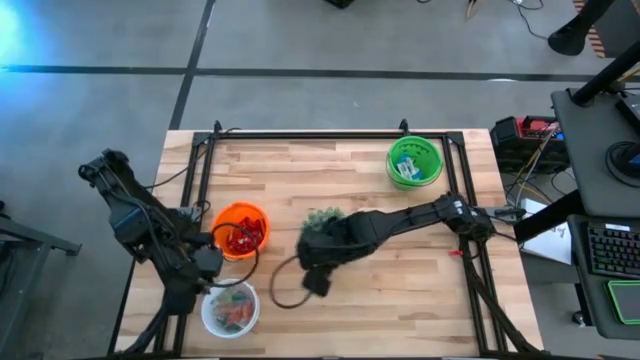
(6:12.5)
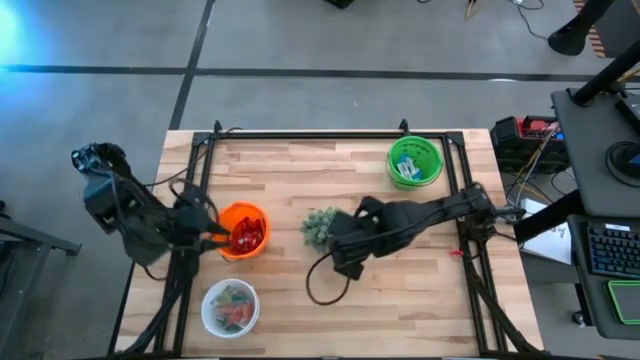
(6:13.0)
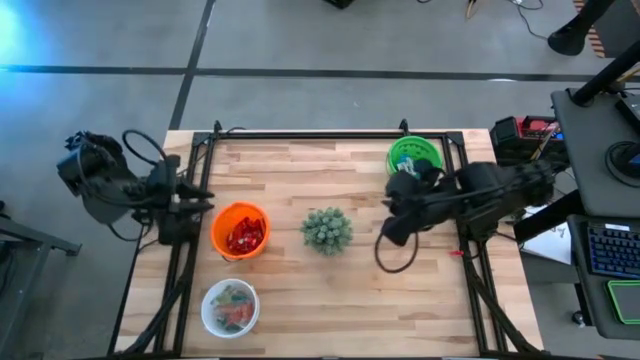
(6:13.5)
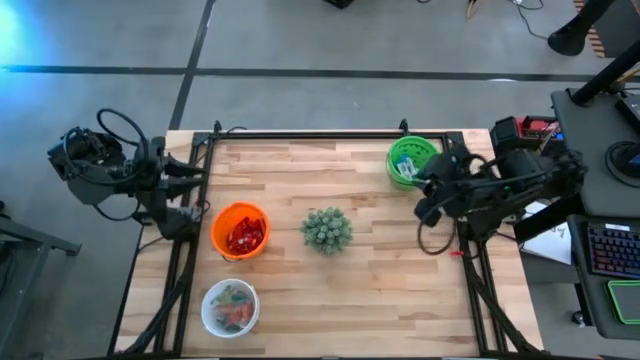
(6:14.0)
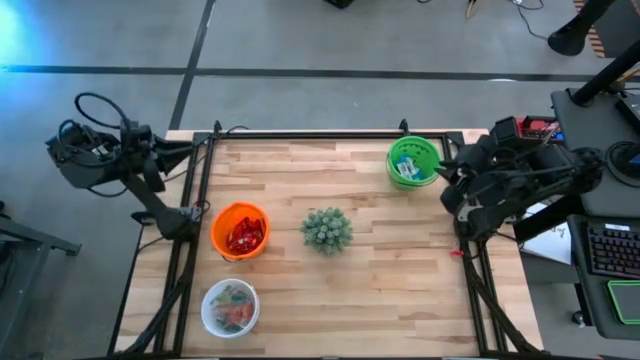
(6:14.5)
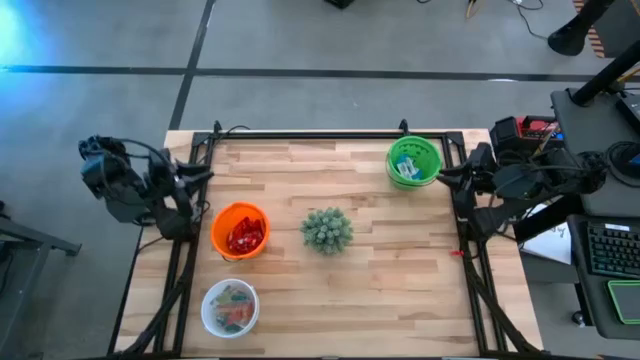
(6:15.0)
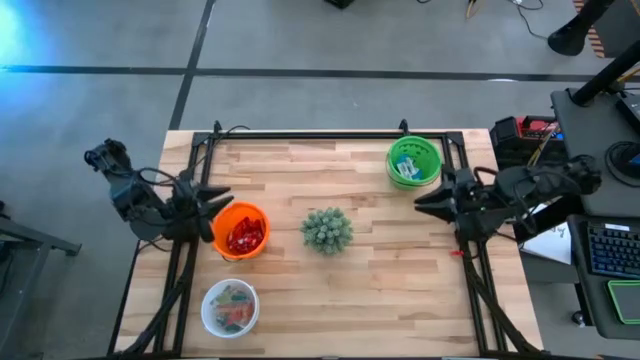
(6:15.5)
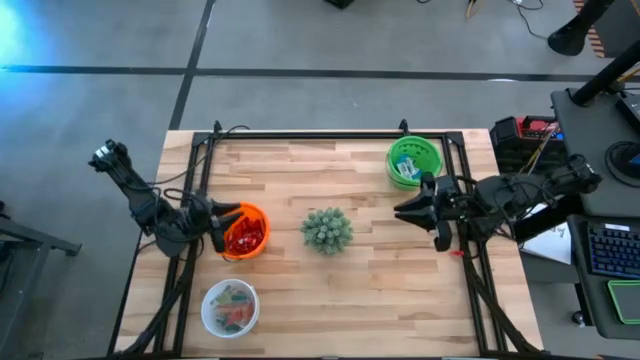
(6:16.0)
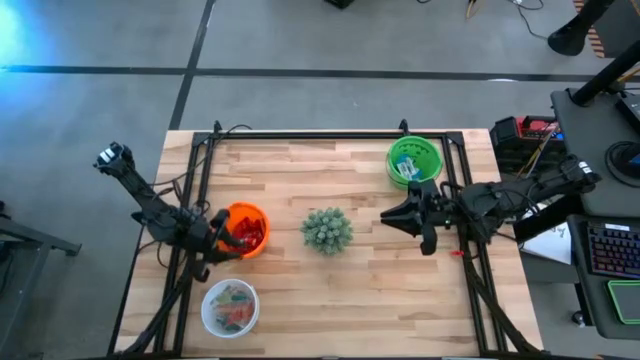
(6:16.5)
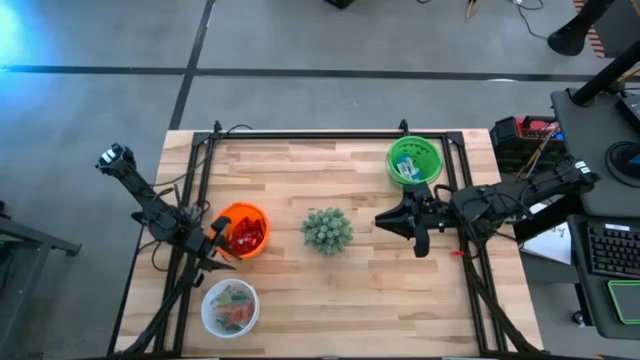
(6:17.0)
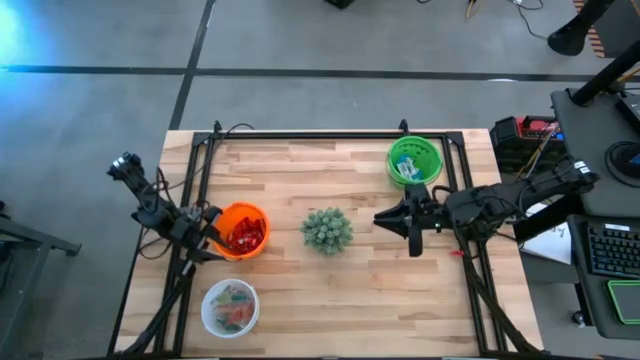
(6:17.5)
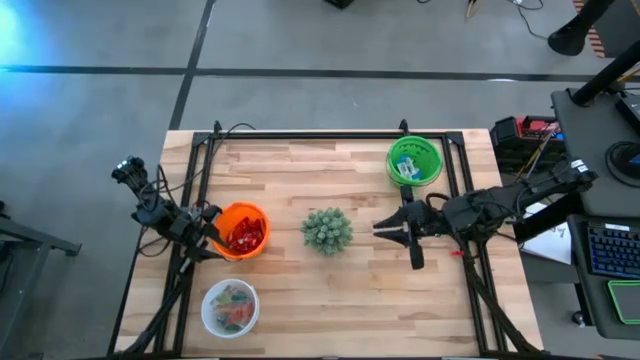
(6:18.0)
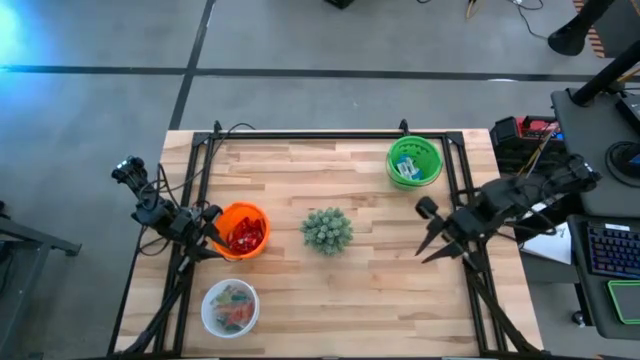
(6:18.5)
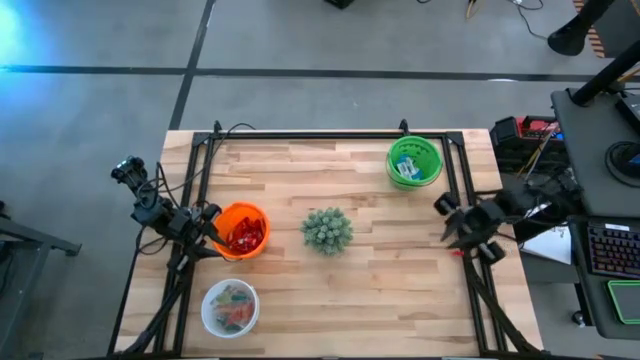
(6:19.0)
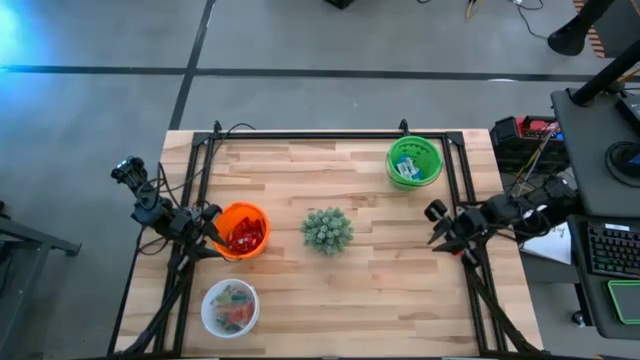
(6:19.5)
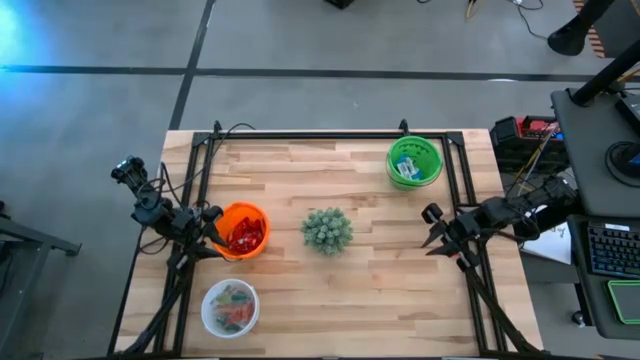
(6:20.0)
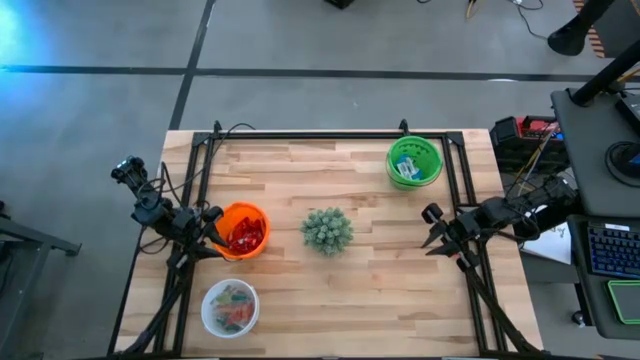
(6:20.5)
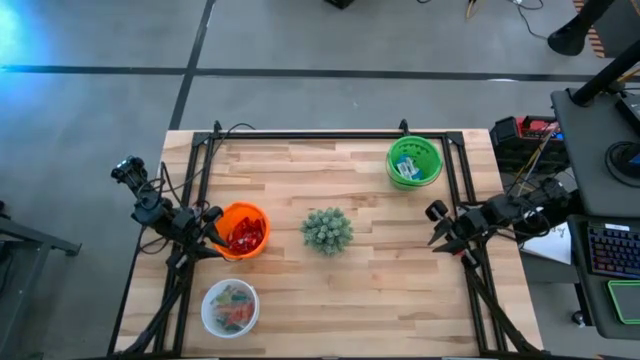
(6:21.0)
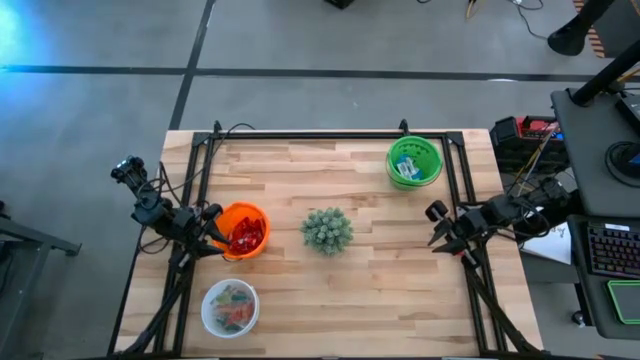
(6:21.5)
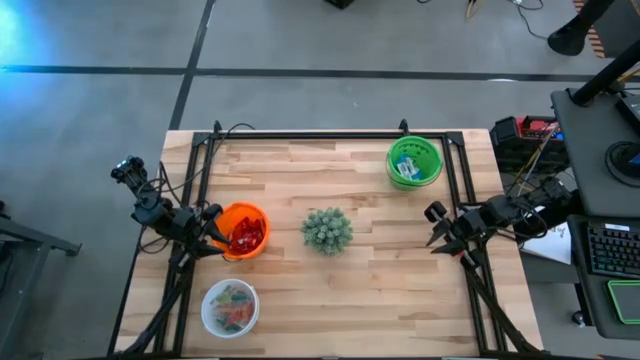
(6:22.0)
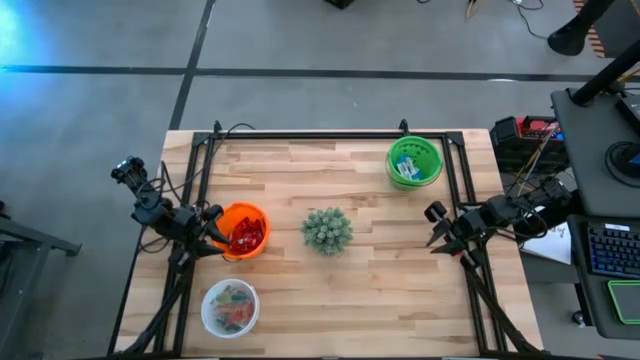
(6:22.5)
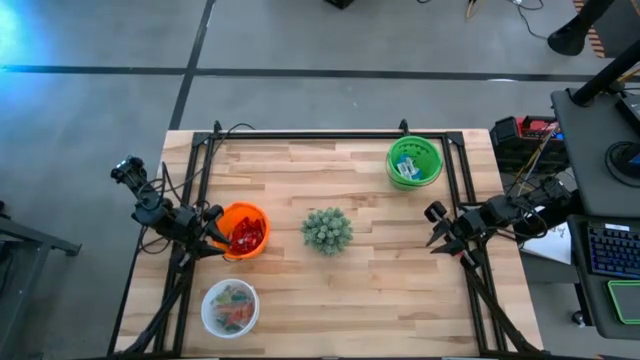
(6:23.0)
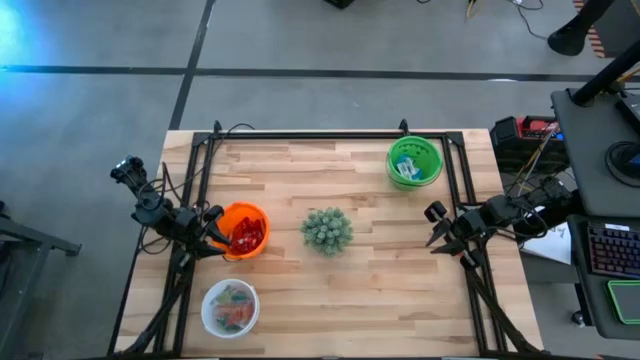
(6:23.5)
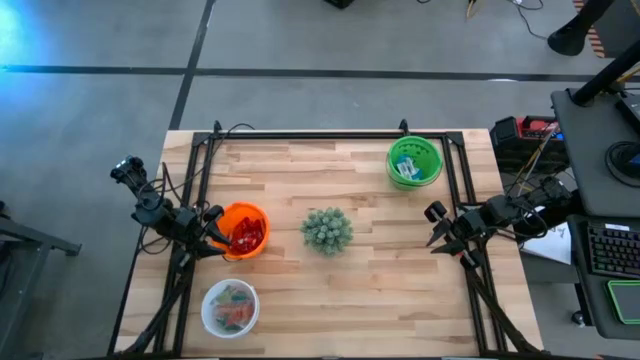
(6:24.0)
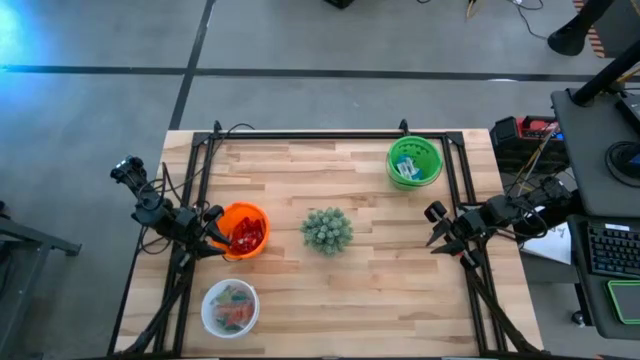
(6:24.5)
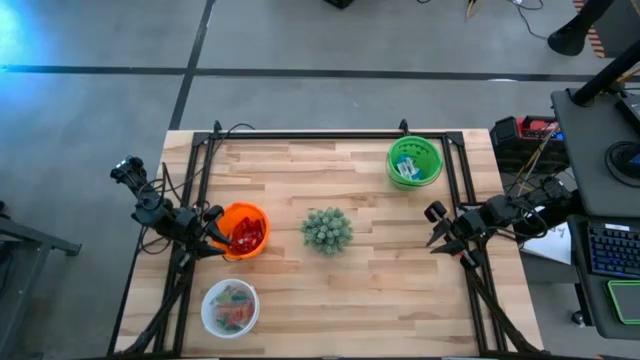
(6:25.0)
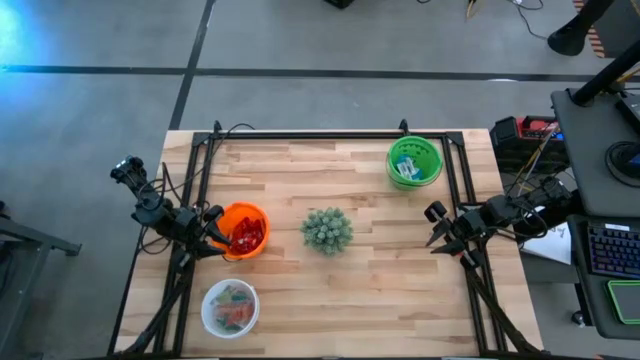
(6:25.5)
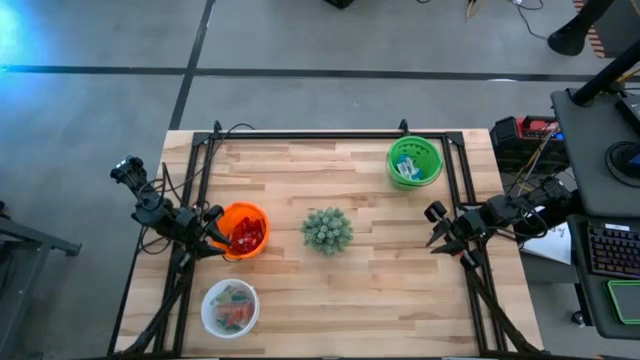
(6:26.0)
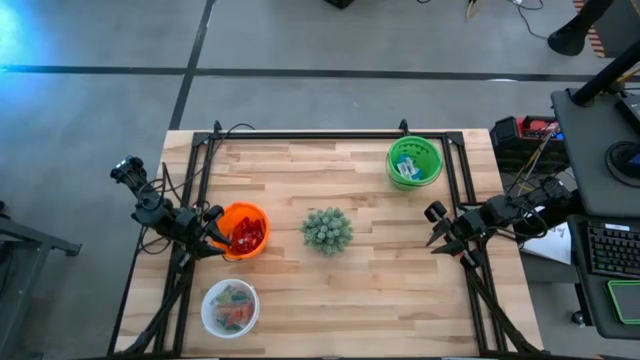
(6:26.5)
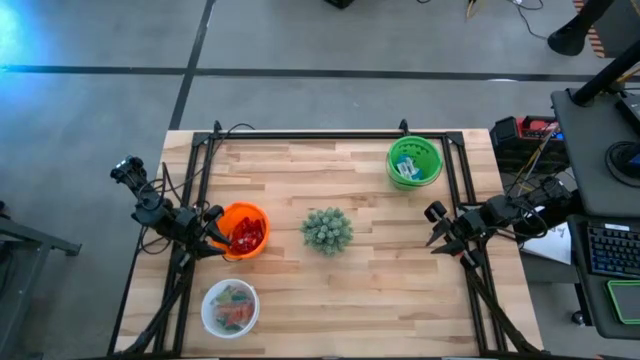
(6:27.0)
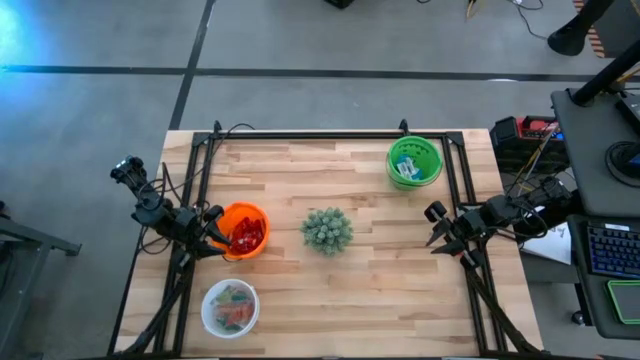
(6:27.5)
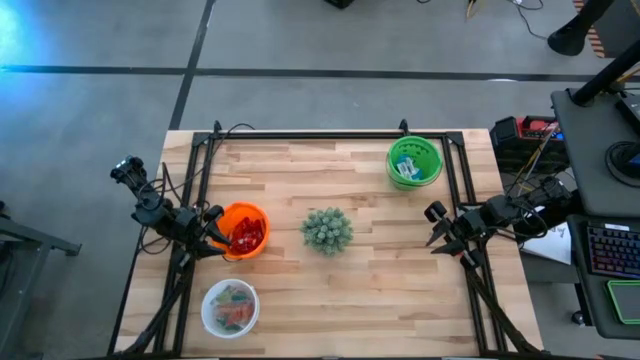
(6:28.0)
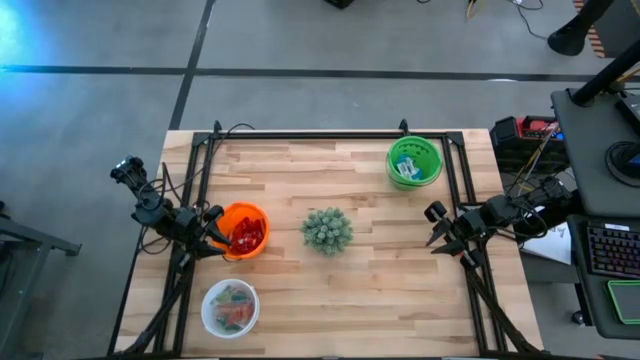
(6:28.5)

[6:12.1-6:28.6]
Task: Sort candy
Return to Home Position

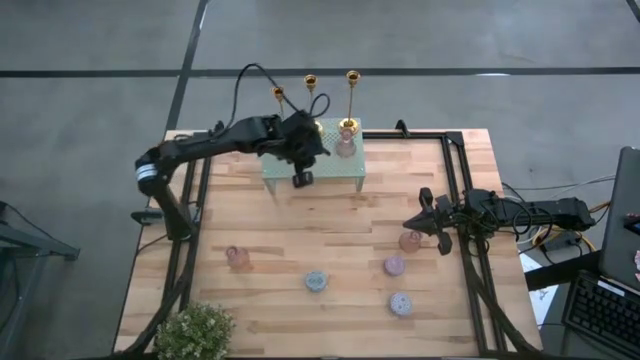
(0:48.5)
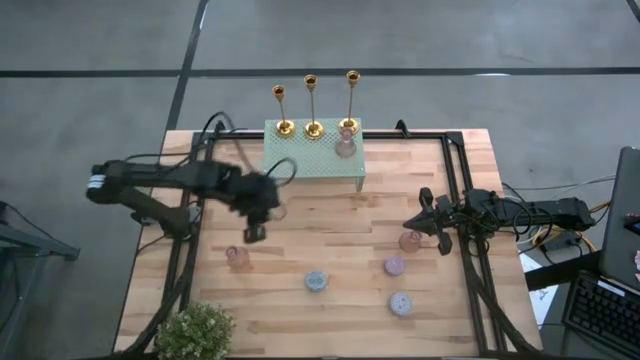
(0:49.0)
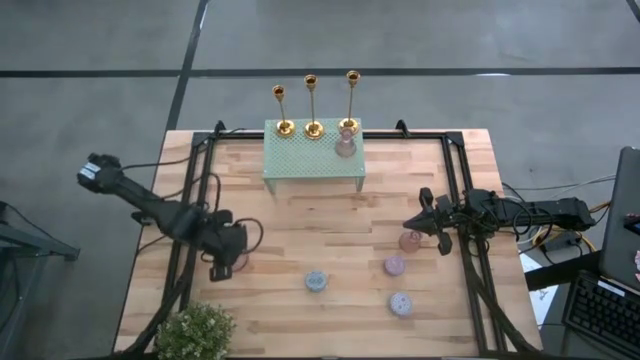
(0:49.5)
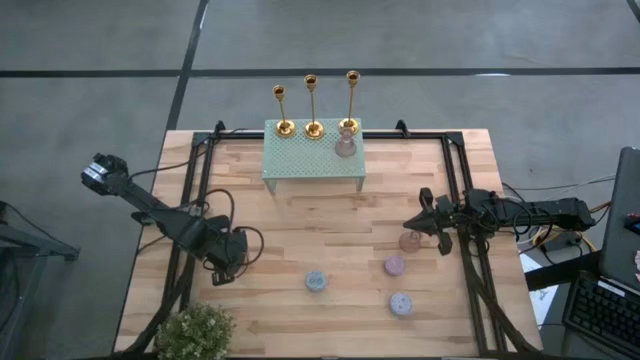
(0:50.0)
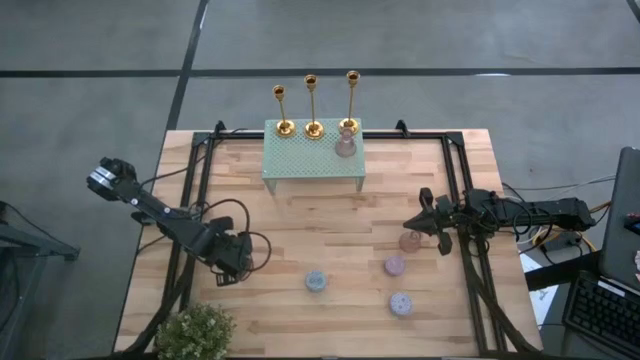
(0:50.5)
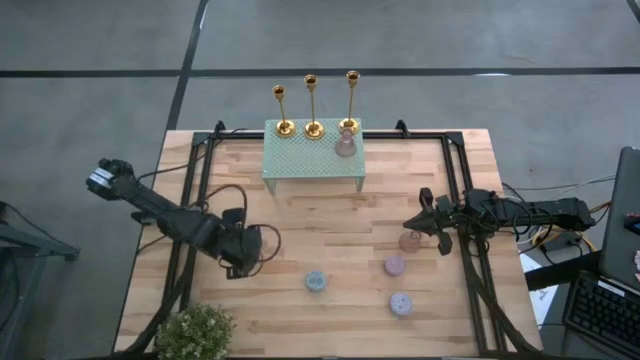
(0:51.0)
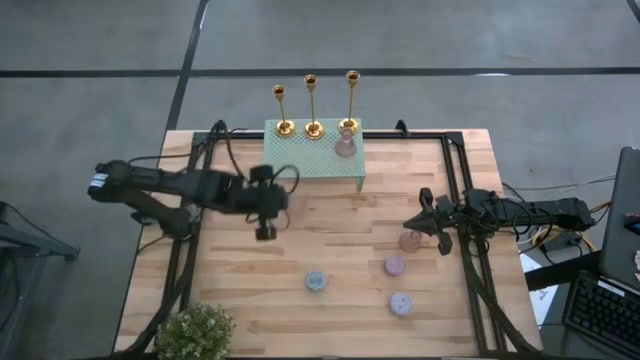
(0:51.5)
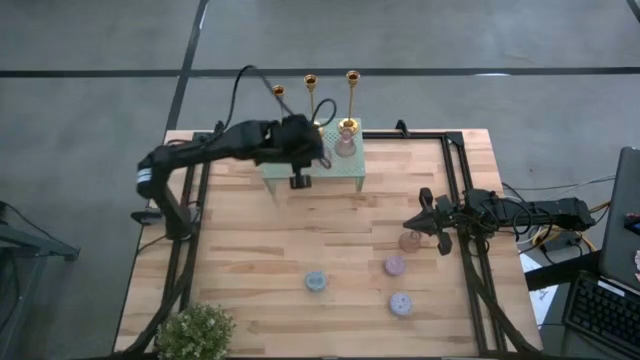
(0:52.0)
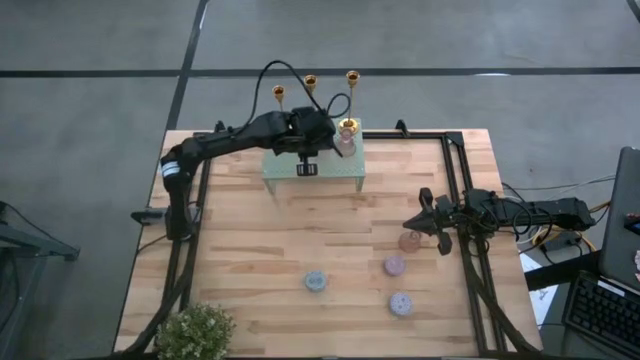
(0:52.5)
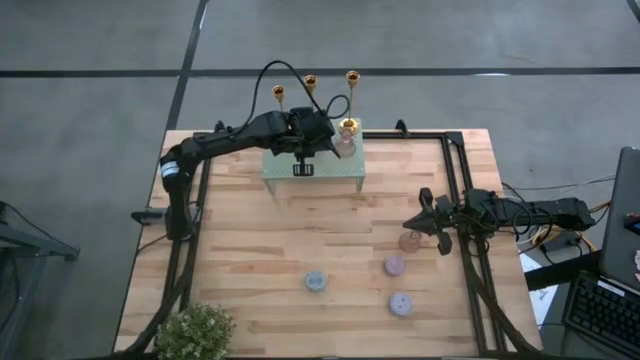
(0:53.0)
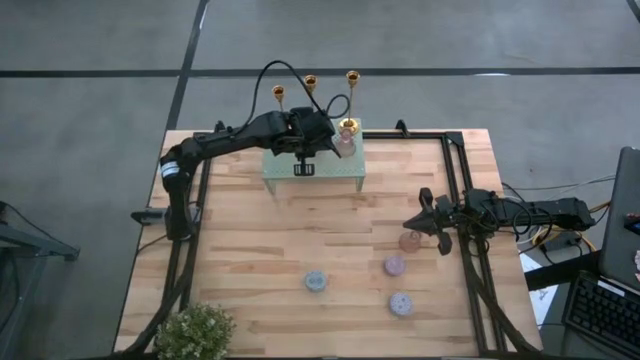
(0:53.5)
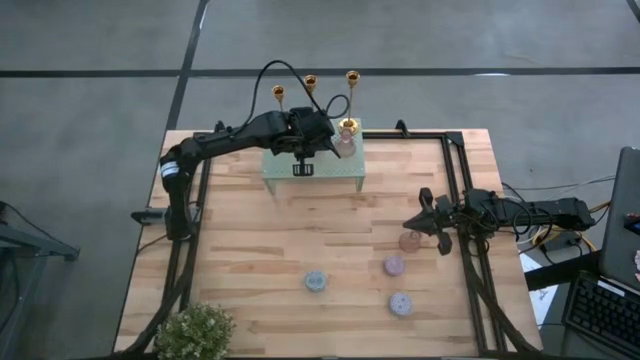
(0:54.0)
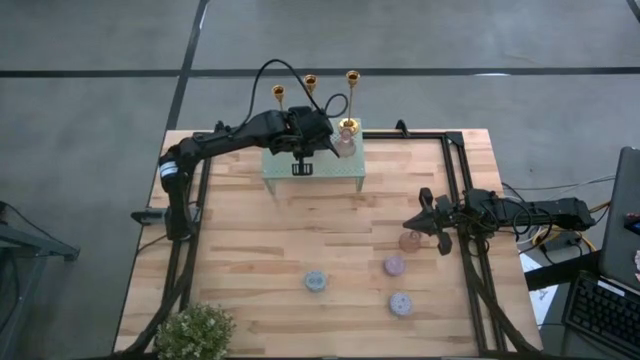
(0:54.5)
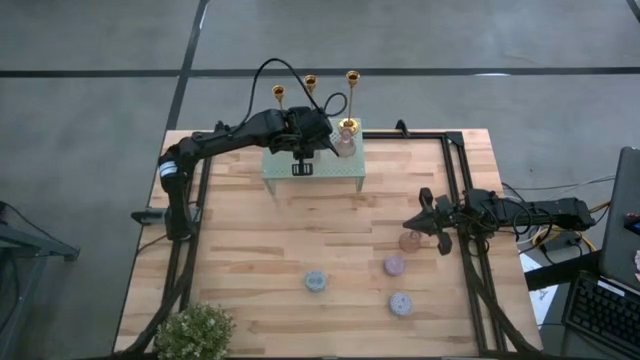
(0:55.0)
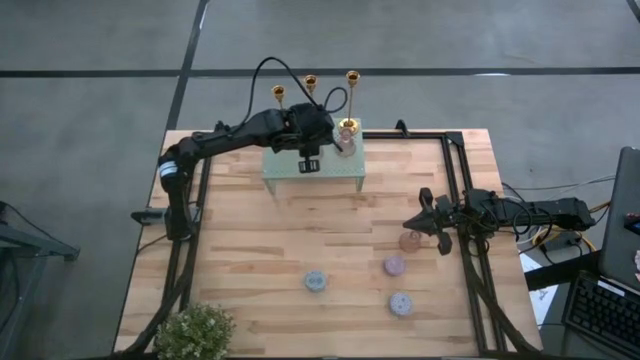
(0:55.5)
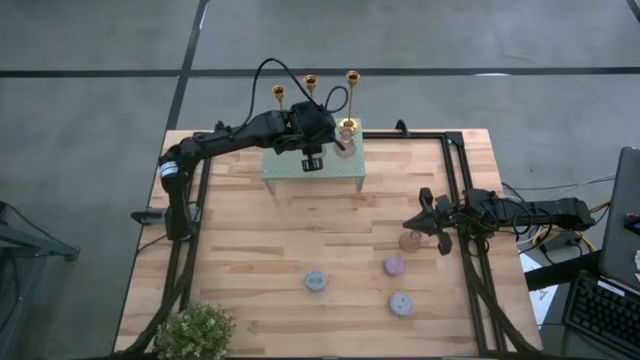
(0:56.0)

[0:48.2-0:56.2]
Task: Pick & Place candle stick holders
Put the left pink candle holder on the shelf aligned with the other pink candle holder
